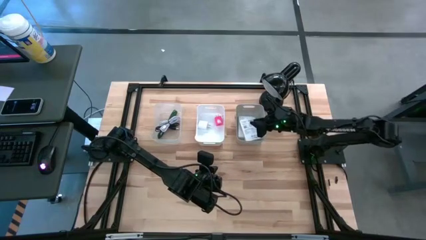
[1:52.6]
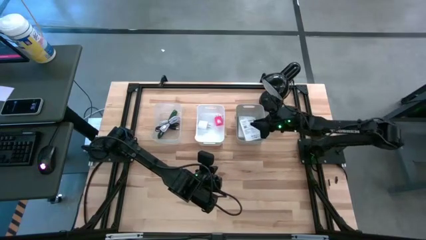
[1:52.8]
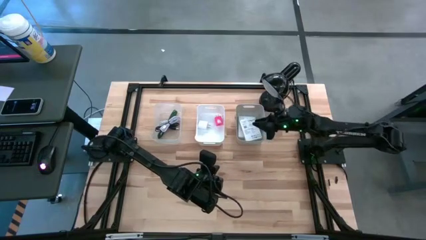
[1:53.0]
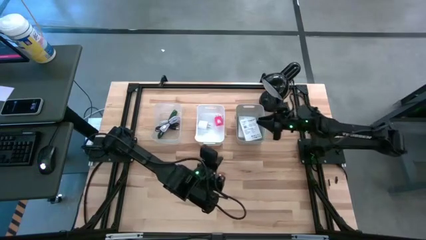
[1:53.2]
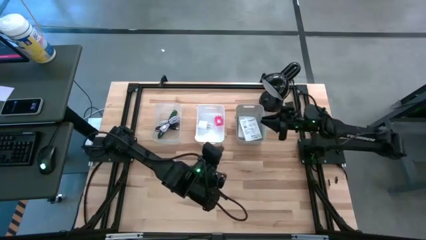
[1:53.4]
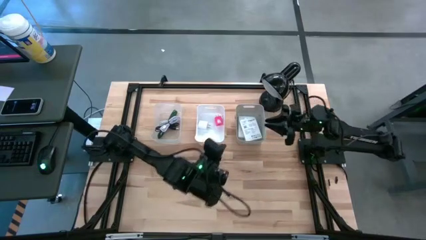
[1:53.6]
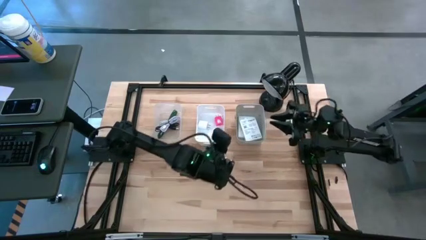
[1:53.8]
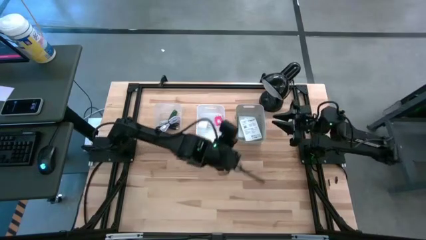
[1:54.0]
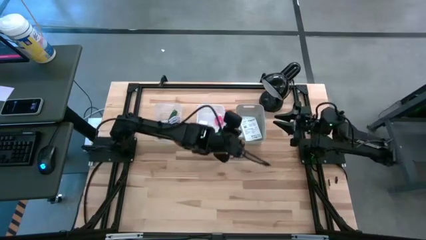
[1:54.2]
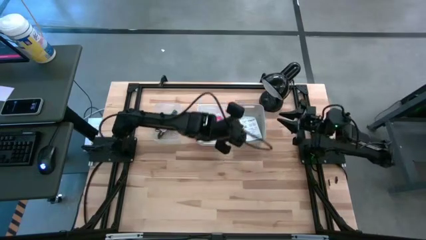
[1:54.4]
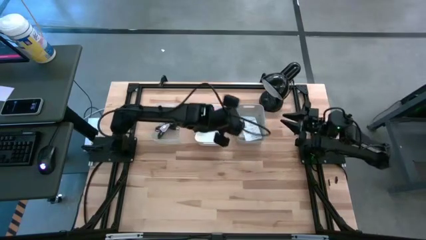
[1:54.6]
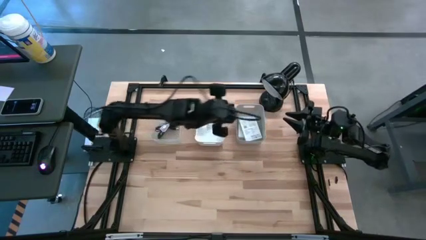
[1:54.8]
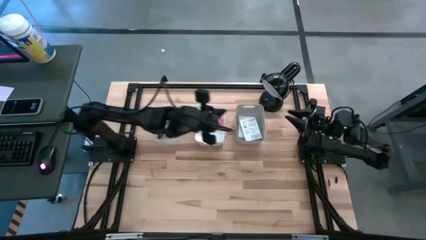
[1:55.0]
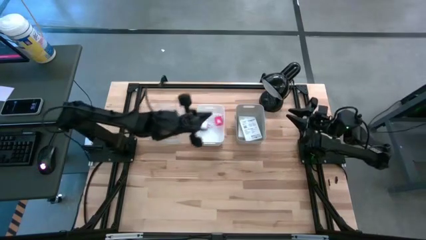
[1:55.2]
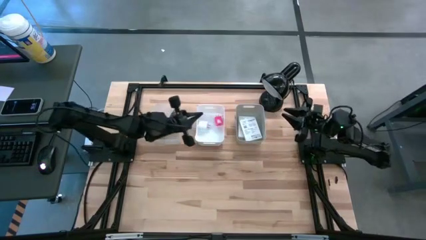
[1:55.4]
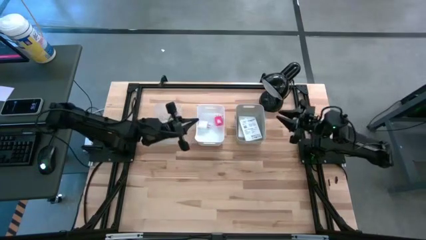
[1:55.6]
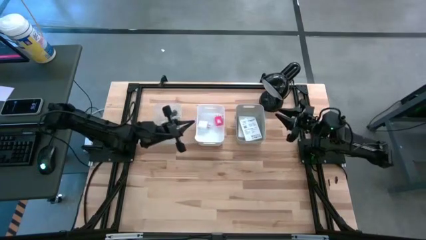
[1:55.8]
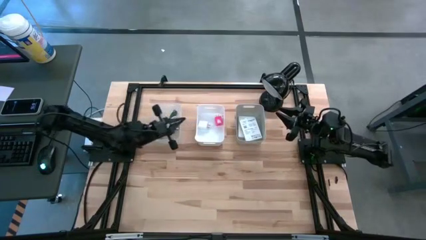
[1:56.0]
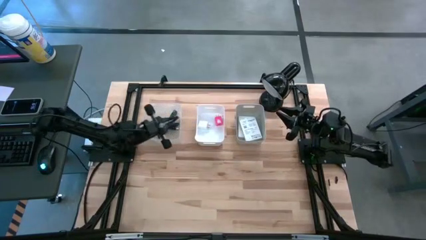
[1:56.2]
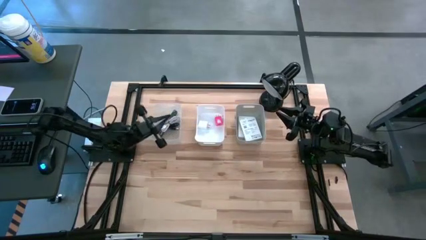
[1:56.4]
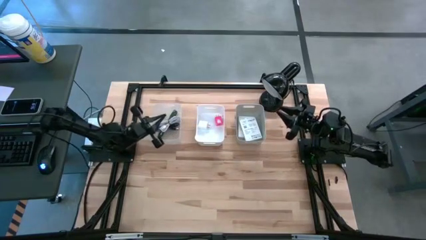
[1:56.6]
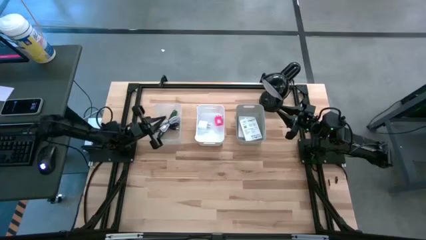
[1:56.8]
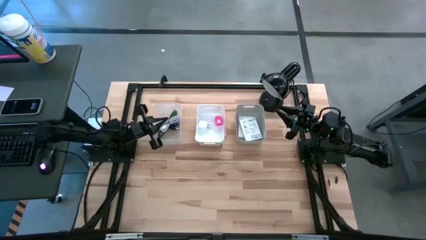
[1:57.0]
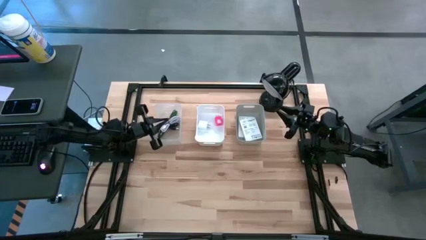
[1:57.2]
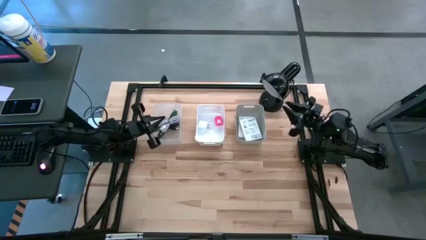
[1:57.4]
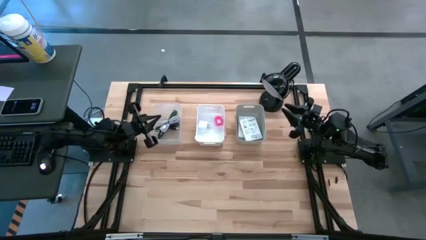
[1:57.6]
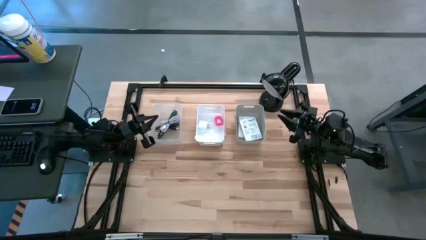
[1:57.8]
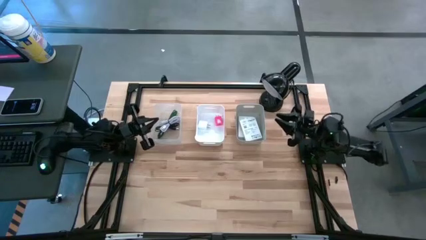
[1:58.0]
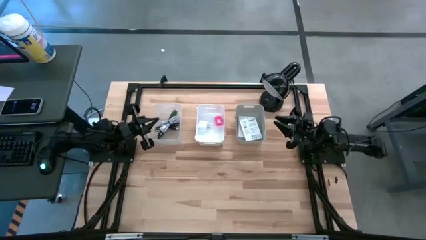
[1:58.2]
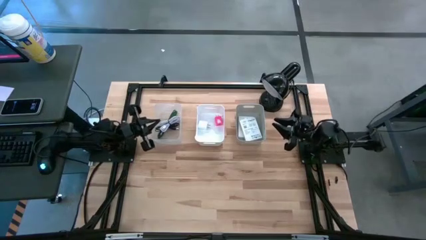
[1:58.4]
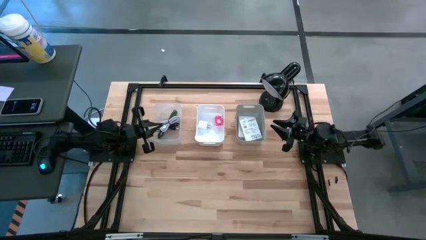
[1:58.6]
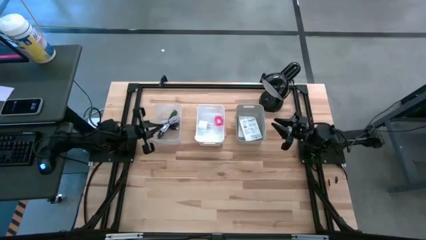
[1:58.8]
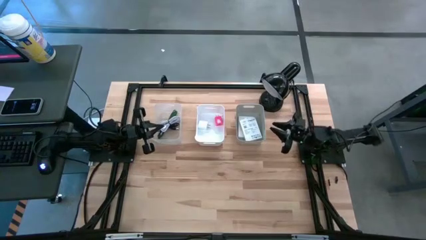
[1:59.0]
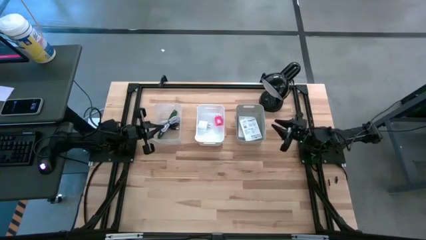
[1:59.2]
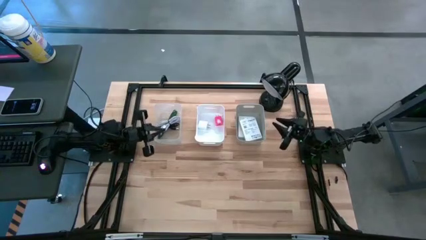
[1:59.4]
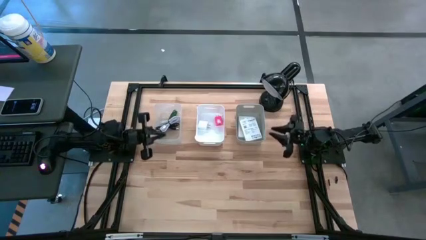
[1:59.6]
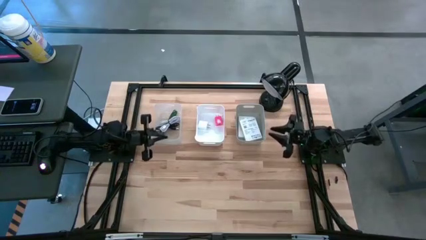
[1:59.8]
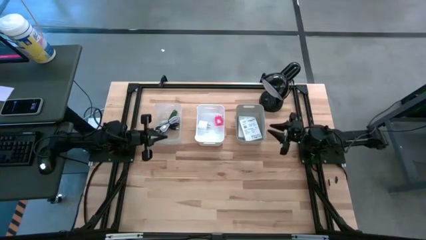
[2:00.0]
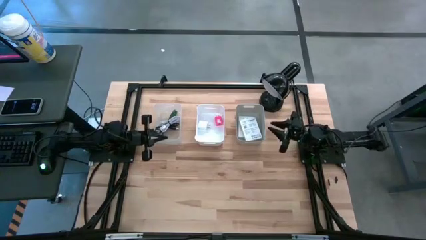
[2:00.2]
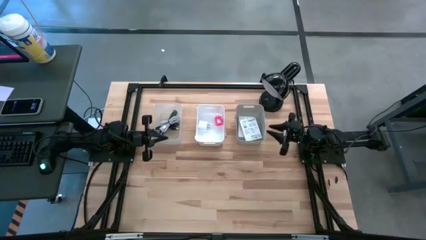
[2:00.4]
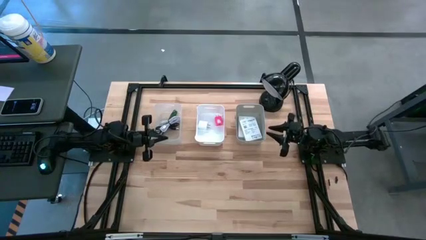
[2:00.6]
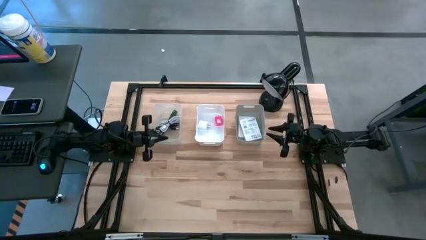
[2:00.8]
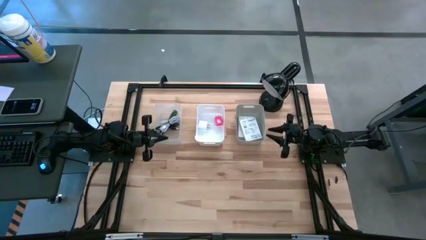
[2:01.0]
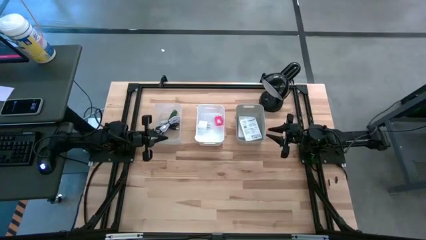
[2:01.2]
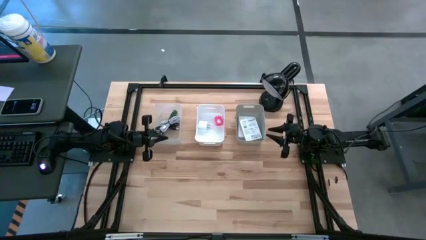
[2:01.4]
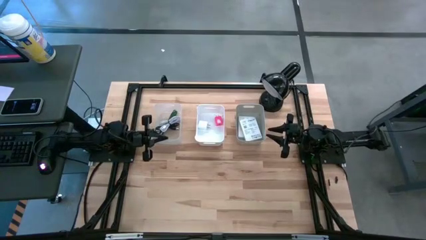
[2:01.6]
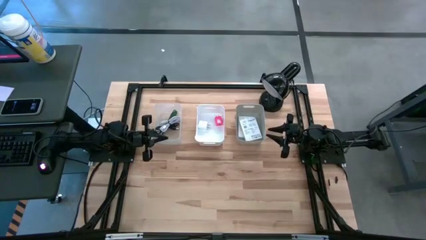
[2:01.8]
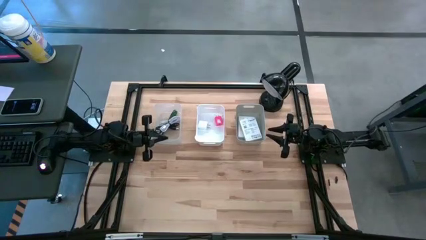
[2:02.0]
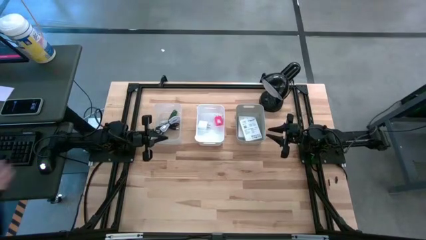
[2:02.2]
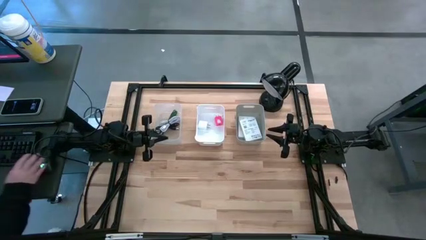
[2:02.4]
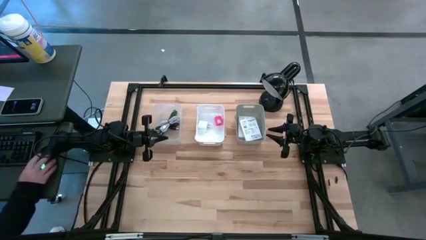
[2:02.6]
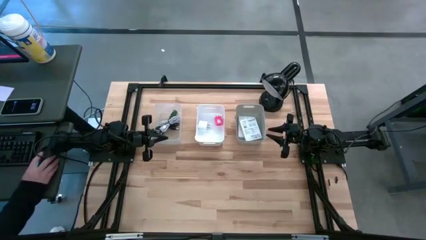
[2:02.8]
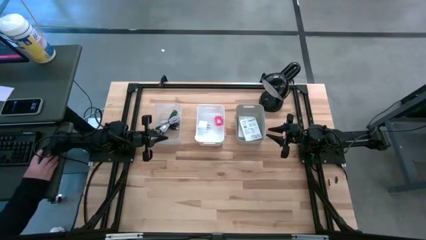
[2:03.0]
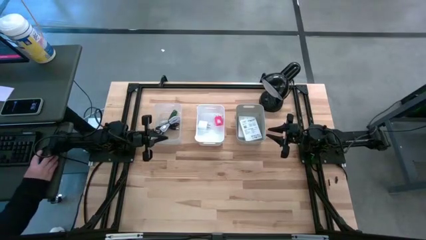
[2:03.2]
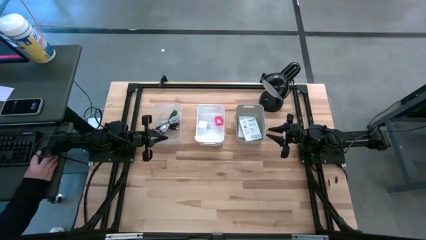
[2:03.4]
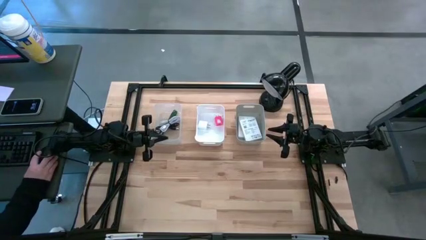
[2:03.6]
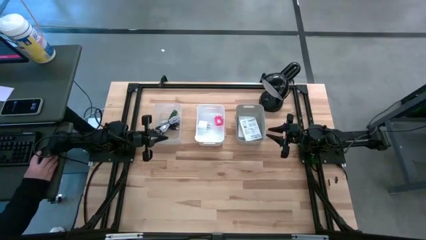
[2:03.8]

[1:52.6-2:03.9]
Task: Pick and place items into bin
Return to Home Position
